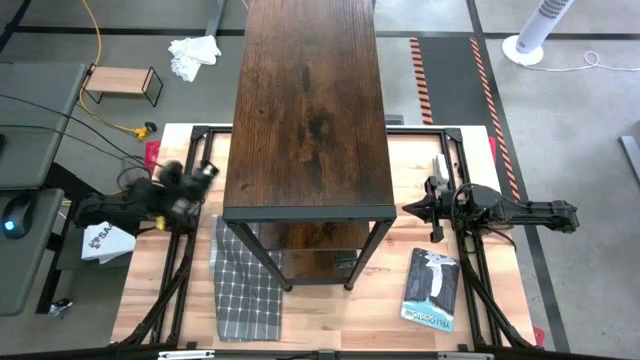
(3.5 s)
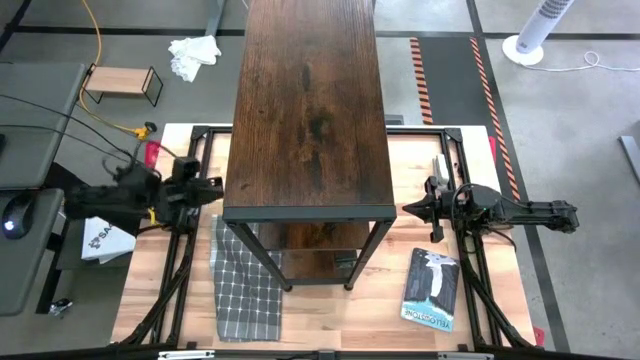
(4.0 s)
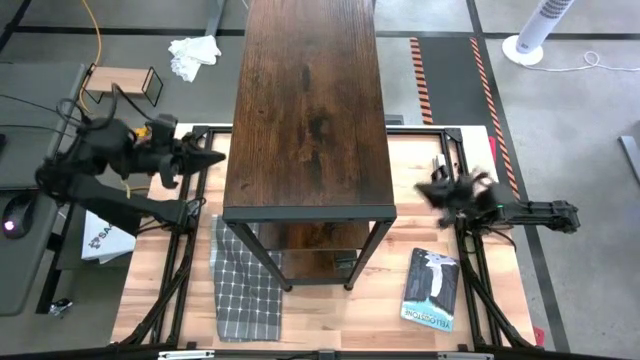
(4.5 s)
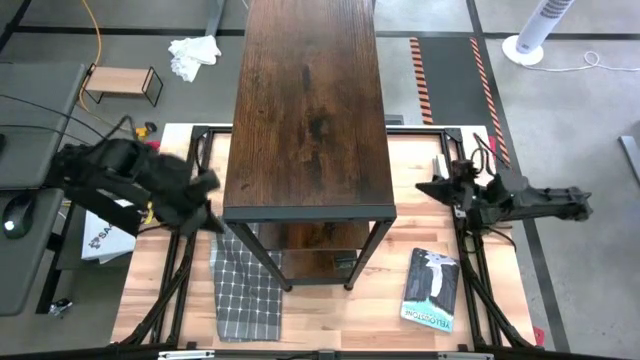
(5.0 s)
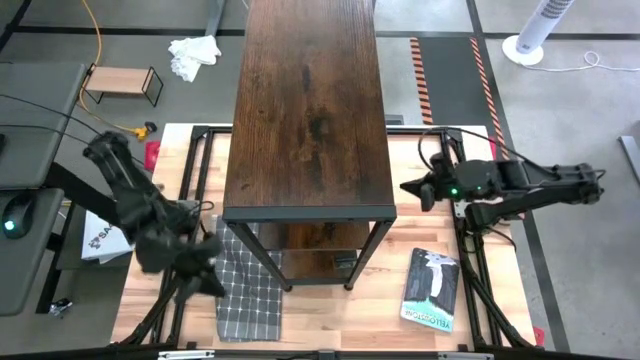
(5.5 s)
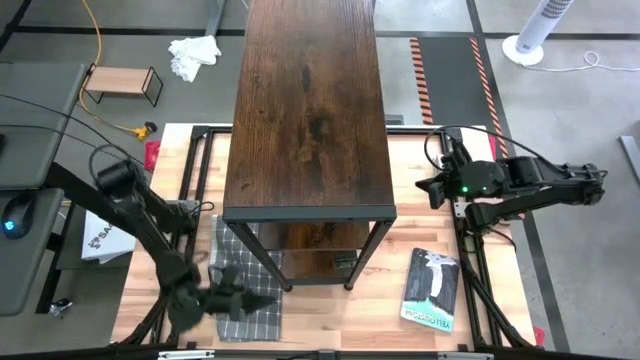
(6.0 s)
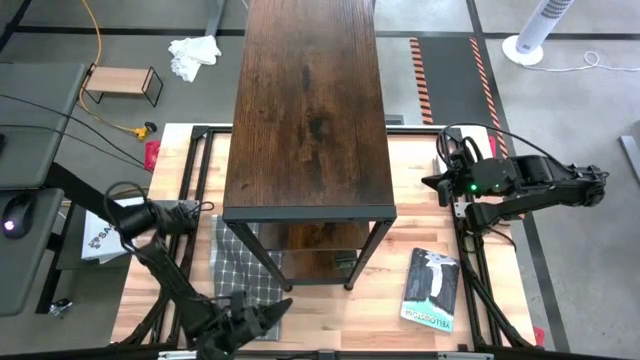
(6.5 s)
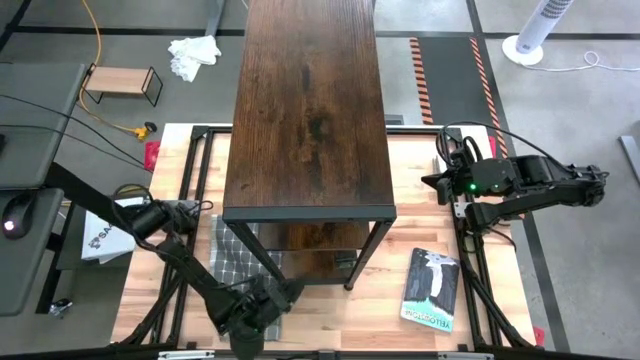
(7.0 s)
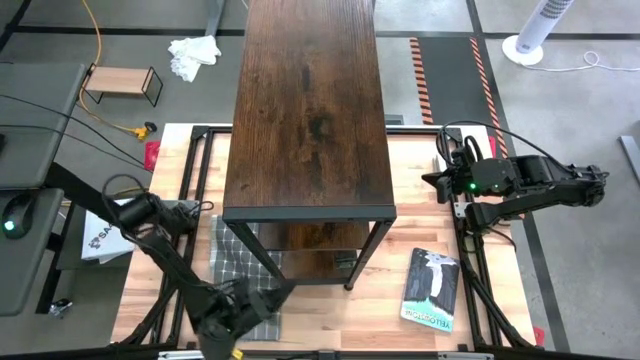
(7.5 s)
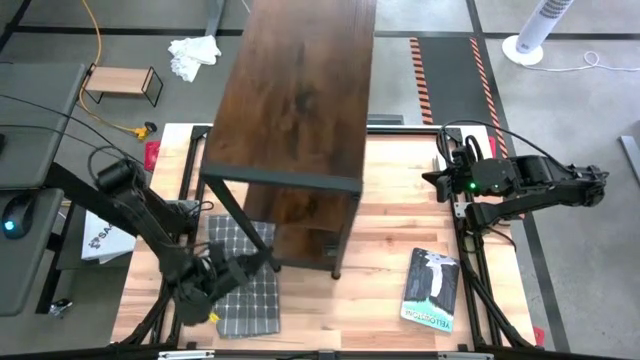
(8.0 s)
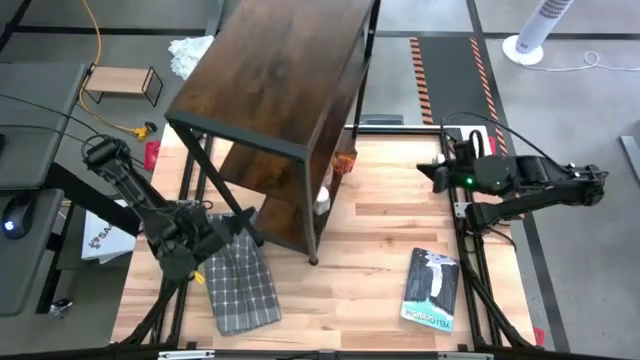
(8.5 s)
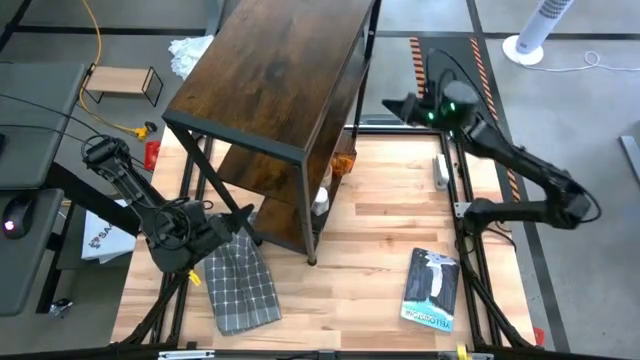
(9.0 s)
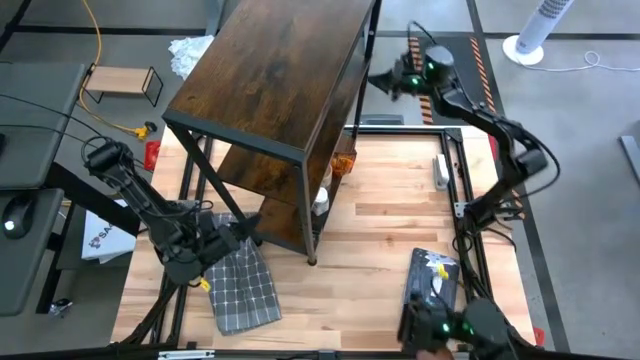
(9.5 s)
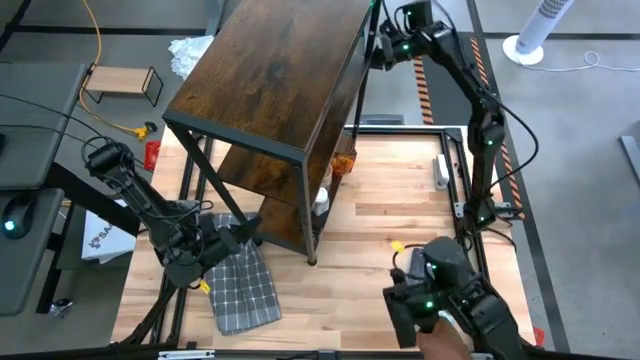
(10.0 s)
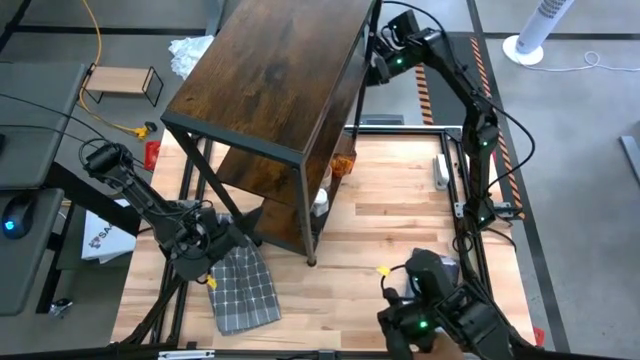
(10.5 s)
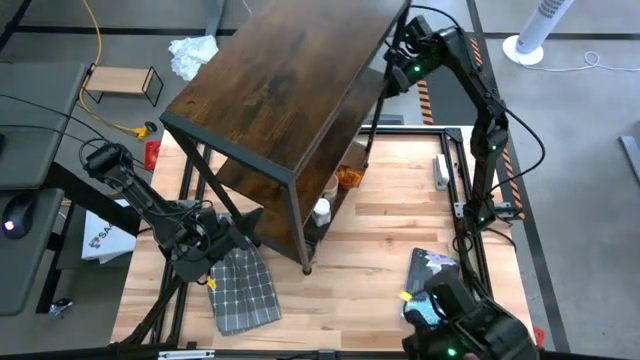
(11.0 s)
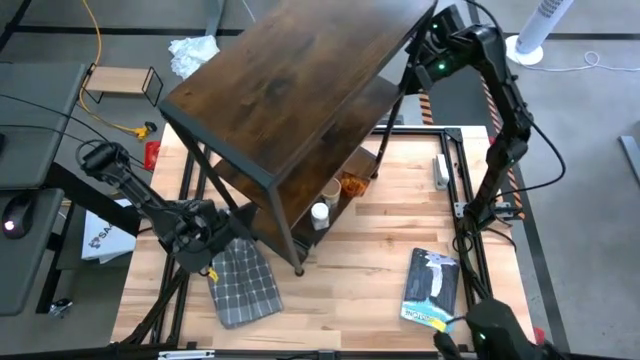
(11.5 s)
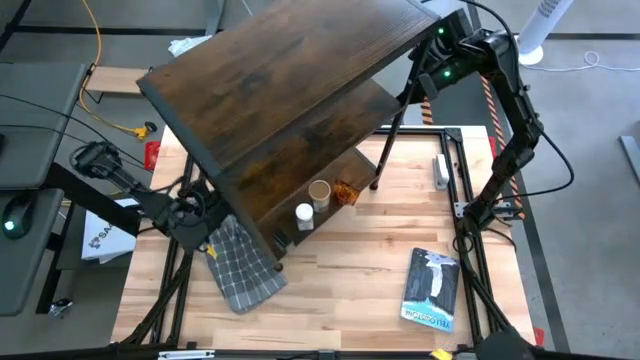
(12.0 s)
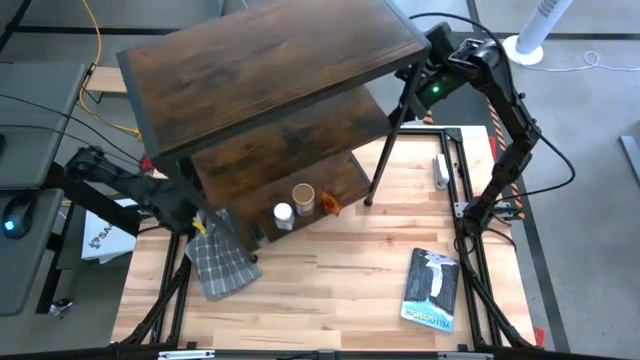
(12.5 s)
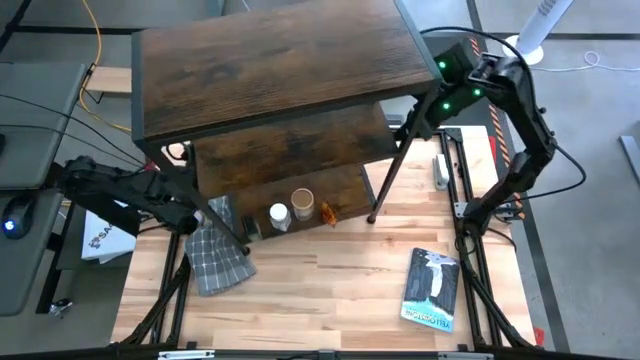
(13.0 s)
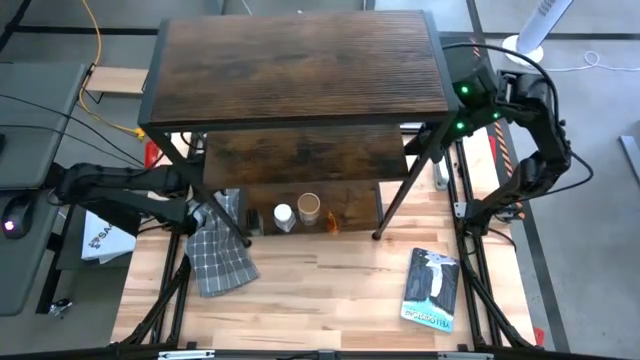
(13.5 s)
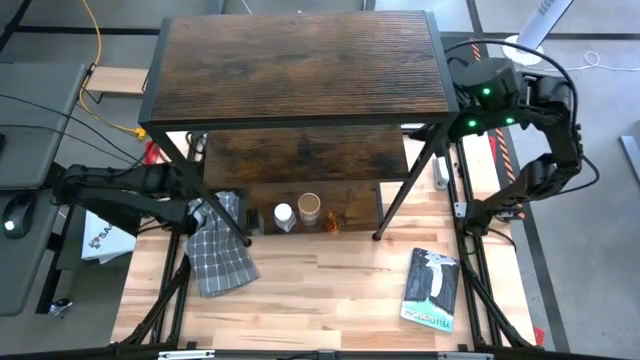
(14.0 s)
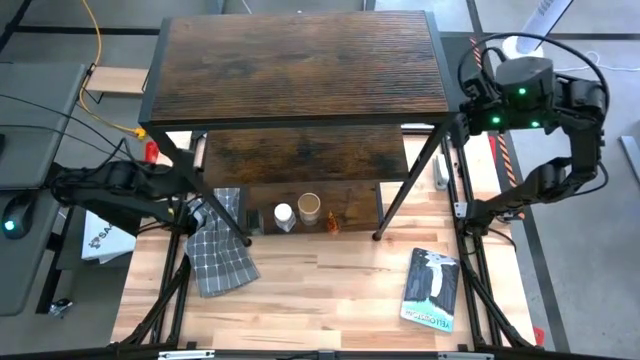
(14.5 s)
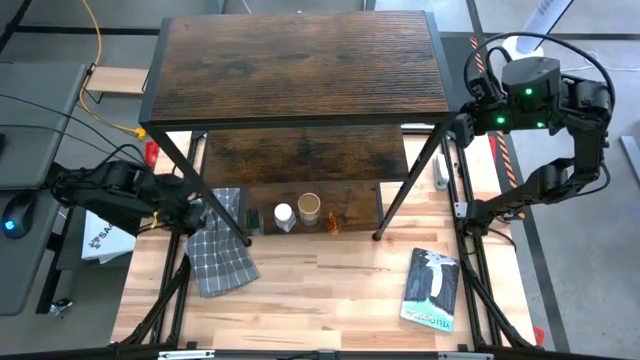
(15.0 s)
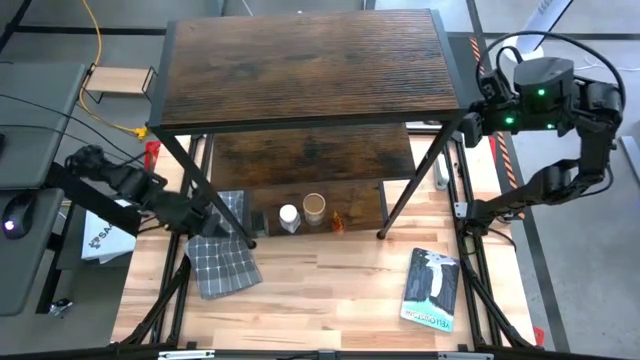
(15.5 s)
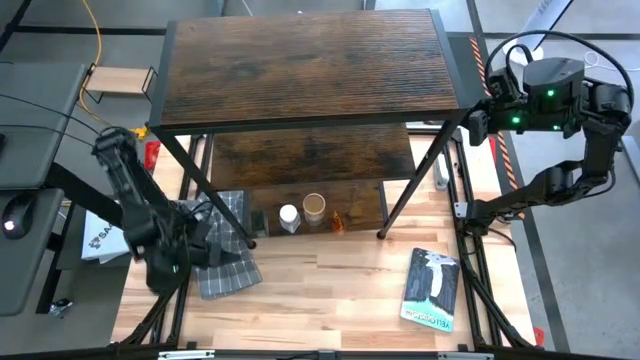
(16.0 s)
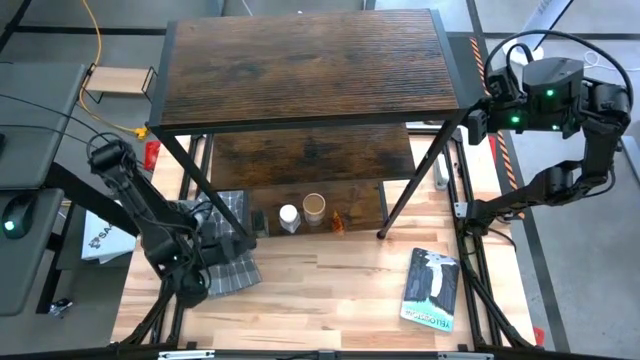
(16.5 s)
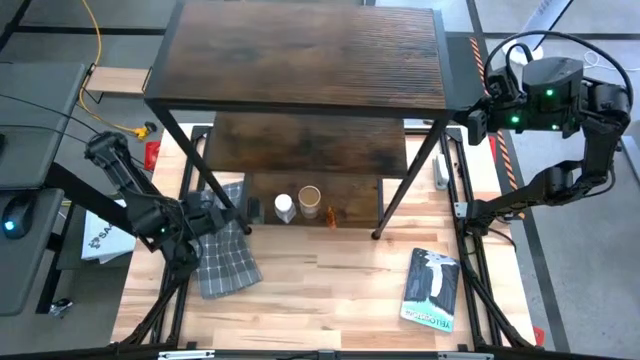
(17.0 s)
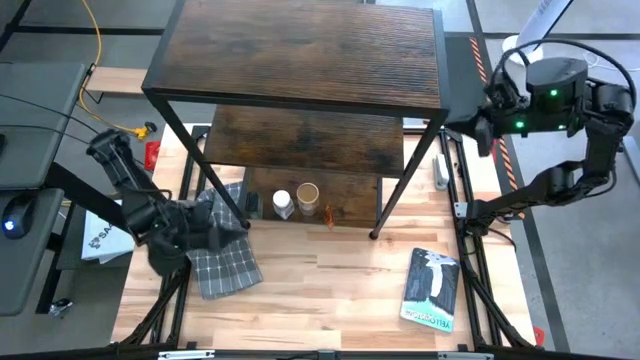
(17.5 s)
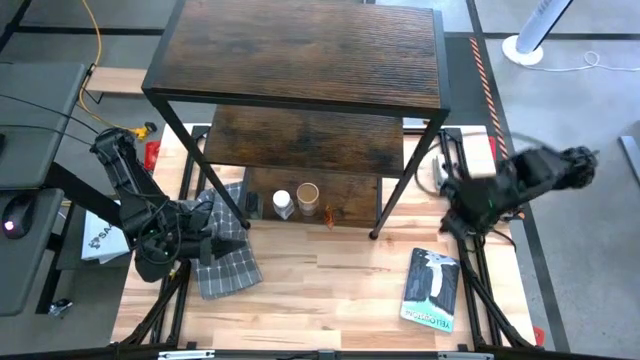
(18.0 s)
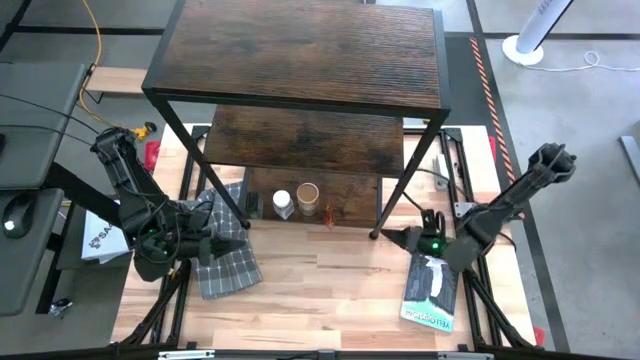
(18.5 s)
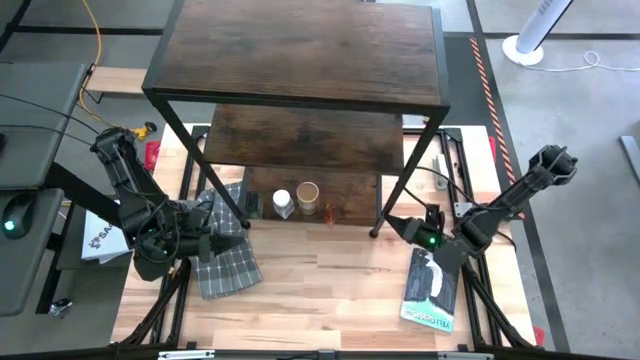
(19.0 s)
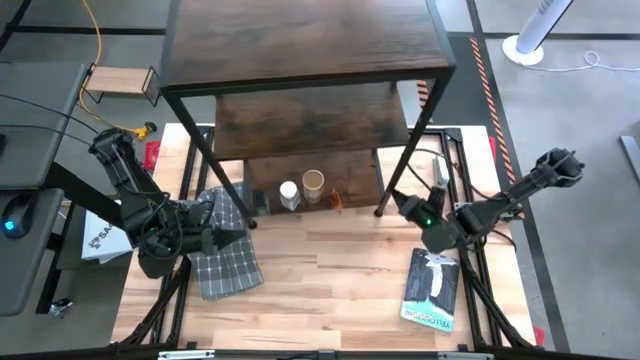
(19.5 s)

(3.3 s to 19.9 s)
Task: Shelf spices
Adjust the shelf

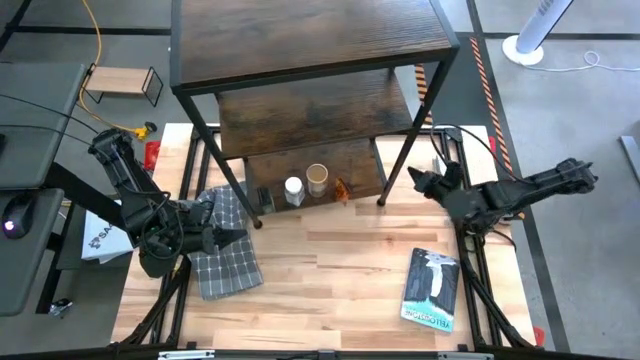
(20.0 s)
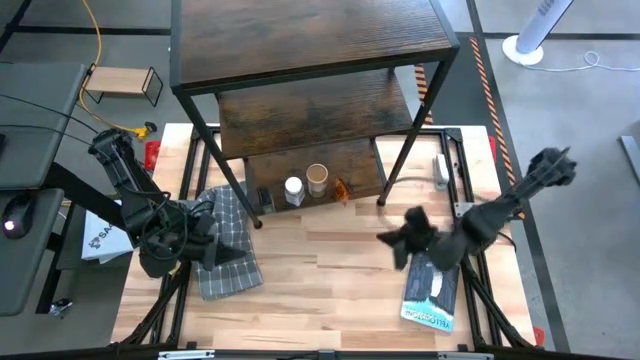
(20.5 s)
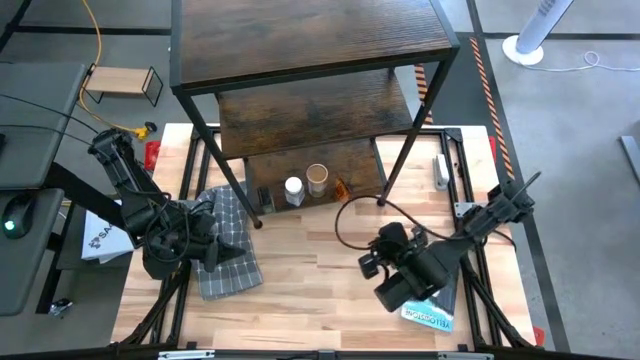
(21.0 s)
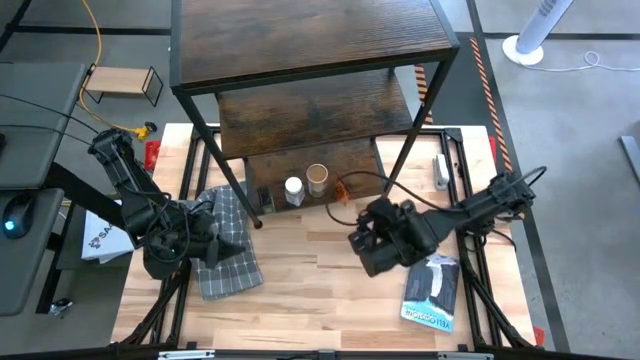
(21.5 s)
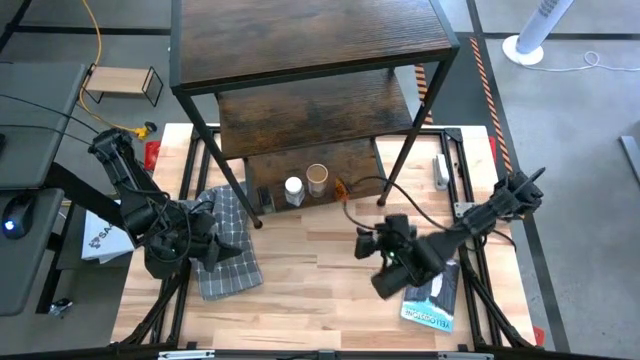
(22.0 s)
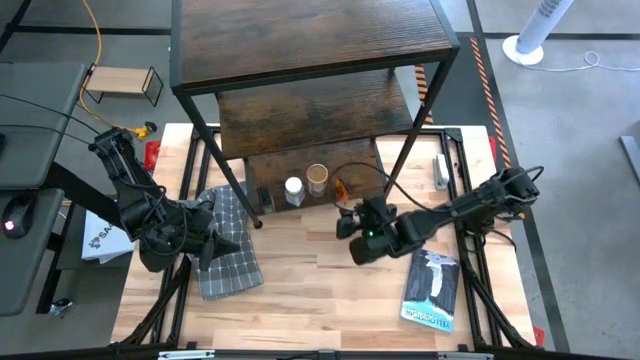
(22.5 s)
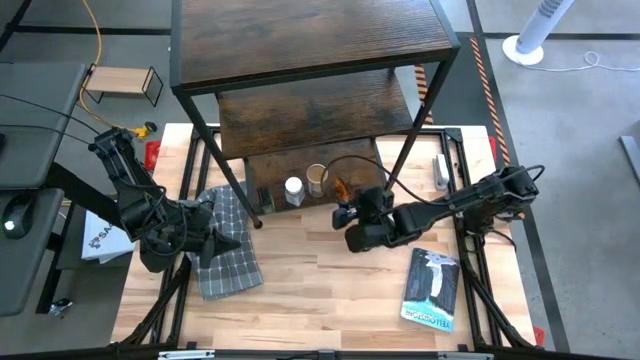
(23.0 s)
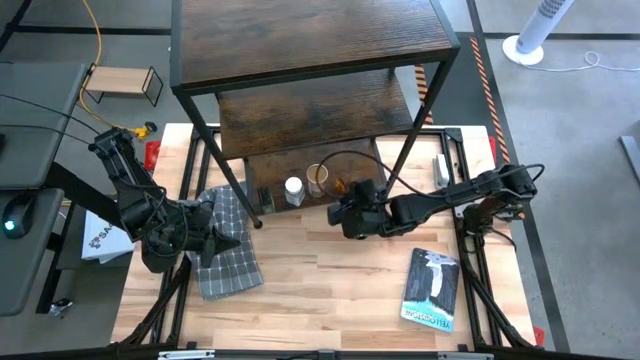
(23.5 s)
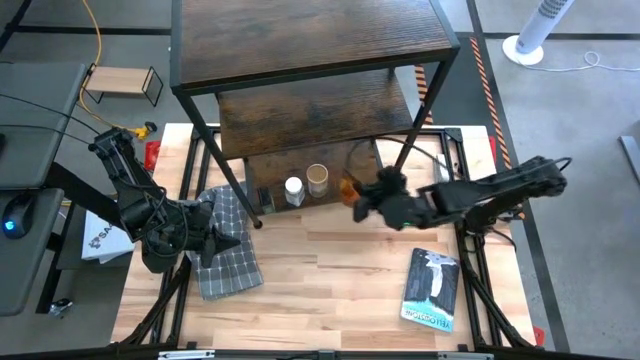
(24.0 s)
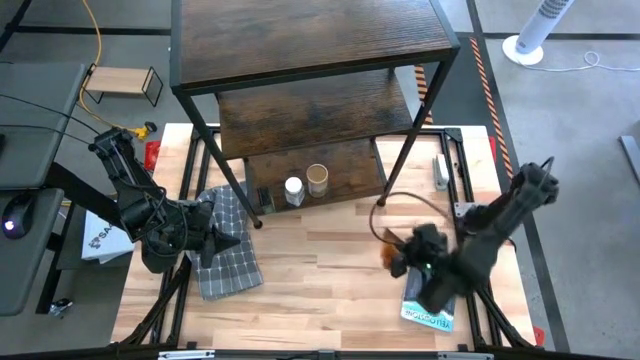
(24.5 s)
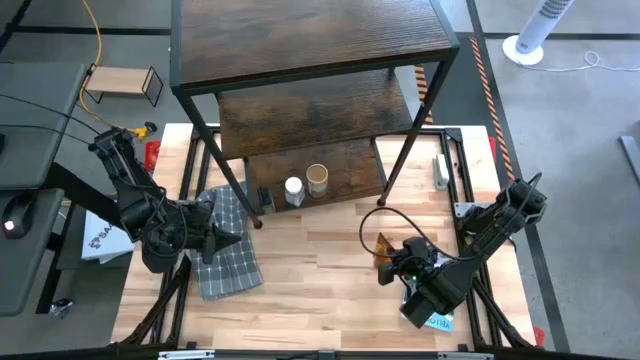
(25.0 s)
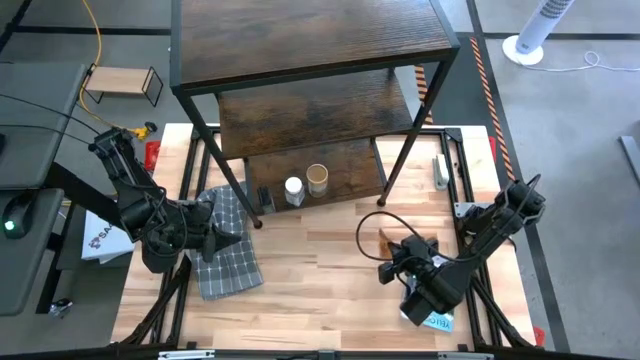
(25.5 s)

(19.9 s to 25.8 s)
Remove the orange seasoning bag from the shelf
